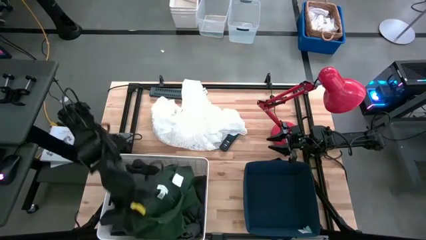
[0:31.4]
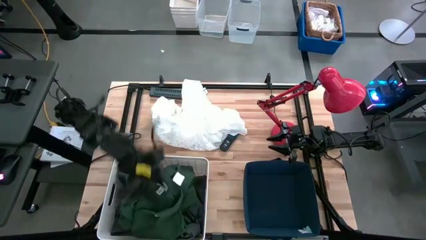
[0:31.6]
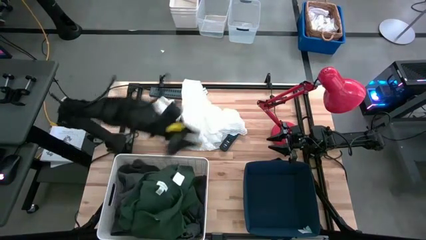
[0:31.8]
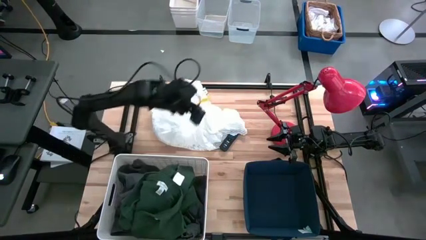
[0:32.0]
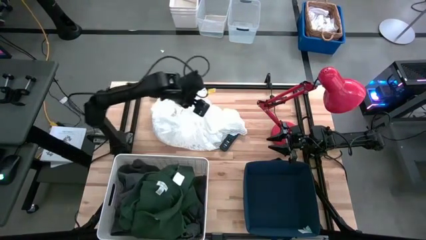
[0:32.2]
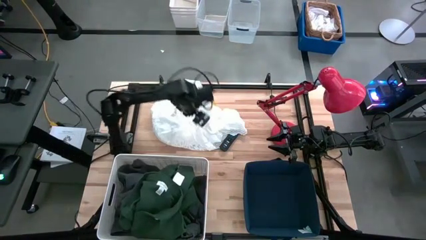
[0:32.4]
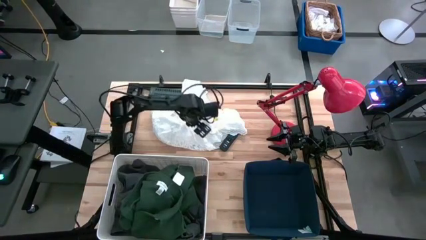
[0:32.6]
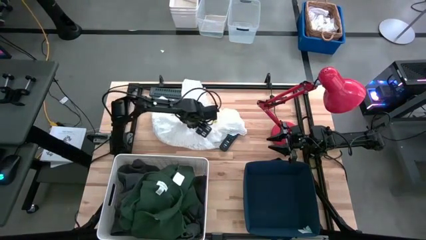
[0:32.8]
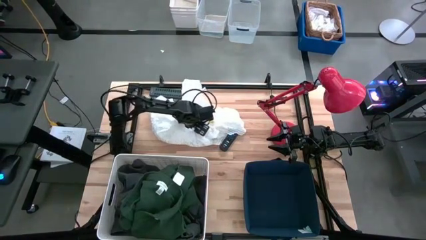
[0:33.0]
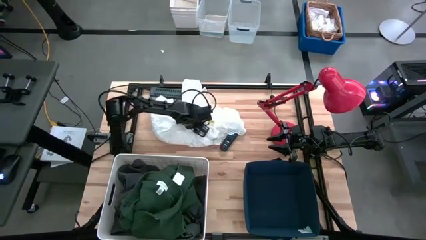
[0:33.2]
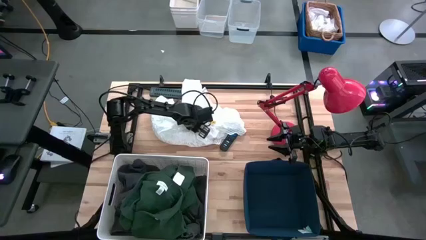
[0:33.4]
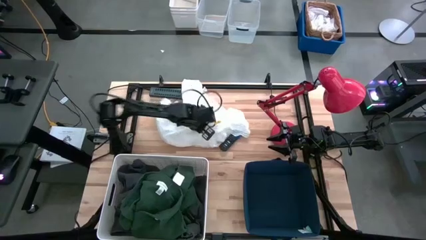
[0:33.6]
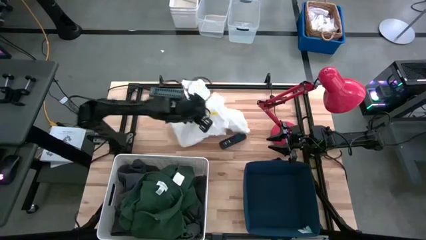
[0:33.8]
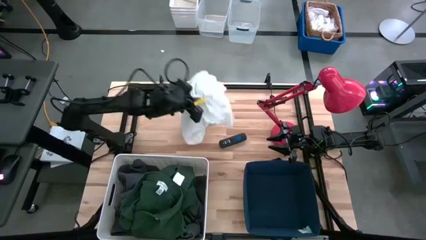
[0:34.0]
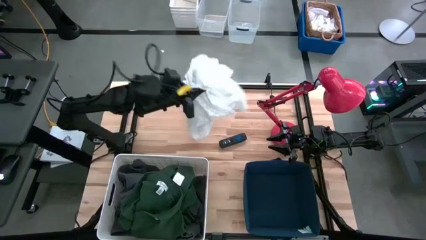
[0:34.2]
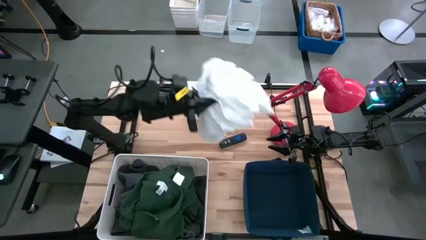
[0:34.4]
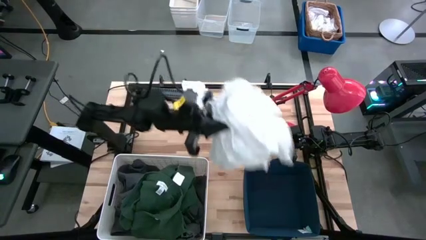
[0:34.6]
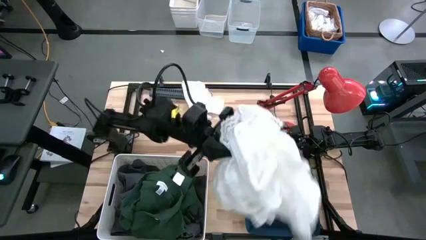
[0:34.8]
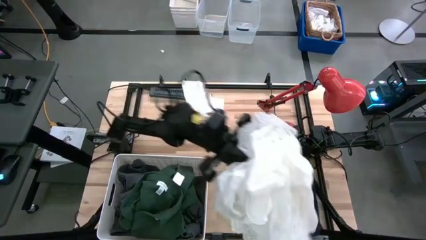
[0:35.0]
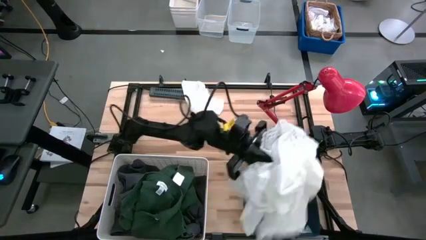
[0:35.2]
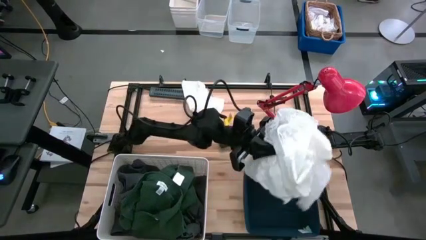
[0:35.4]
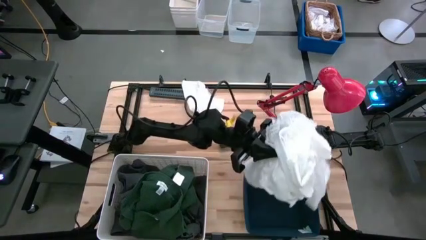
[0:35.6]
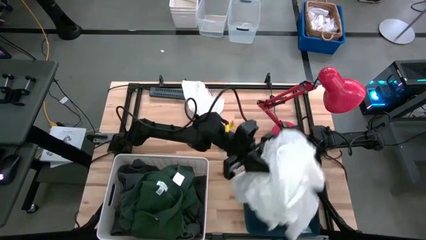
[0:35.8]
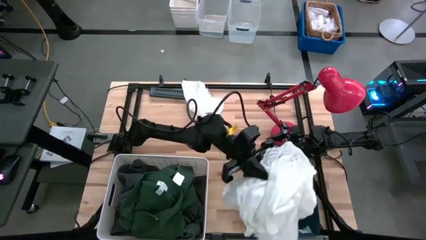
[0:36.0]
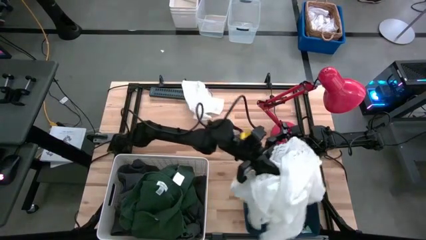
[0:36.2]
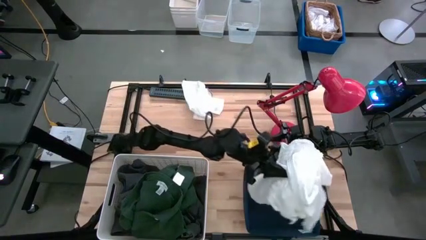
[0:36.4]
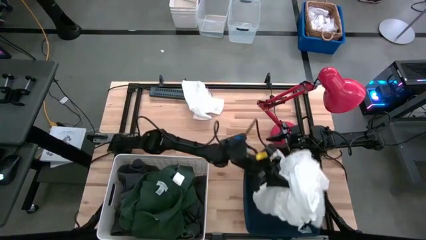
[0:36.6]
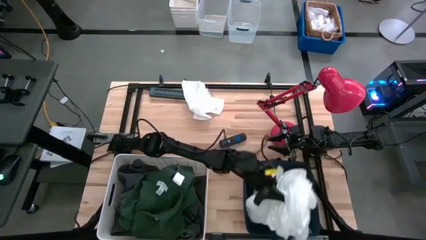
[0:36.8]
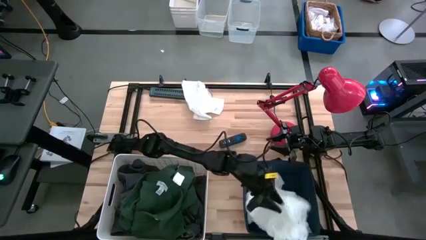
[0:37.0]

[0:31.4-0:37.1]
Task: Sort clothes
Put the white blouse into the blue bin

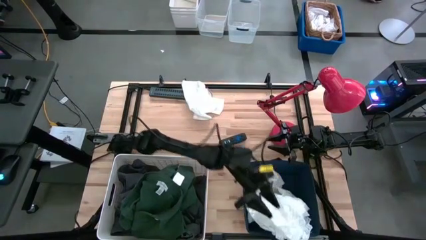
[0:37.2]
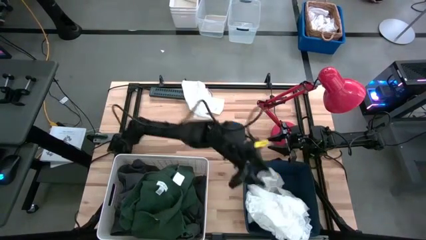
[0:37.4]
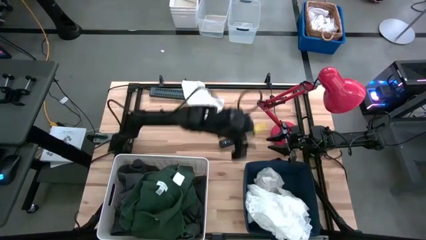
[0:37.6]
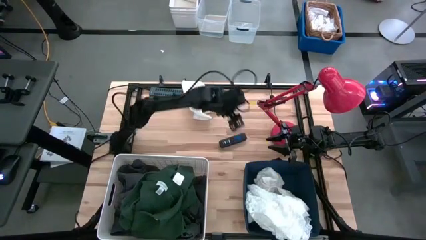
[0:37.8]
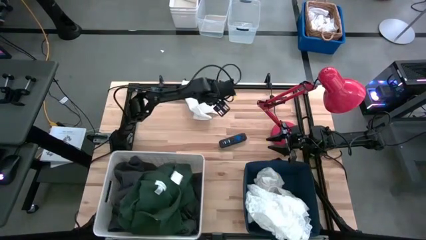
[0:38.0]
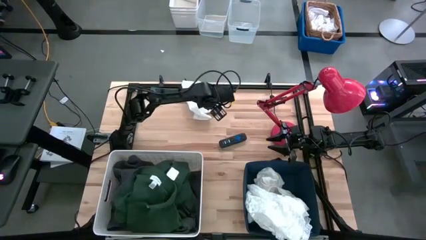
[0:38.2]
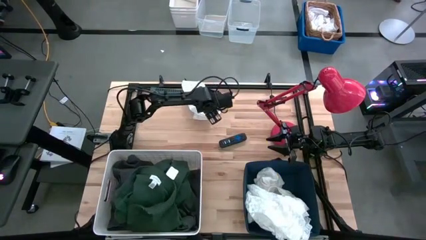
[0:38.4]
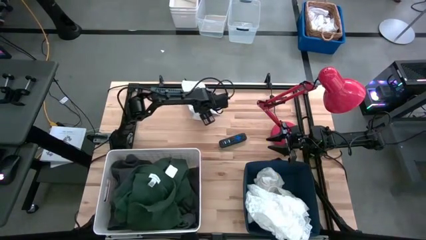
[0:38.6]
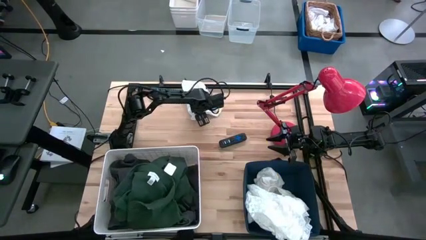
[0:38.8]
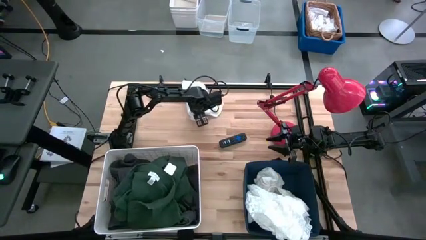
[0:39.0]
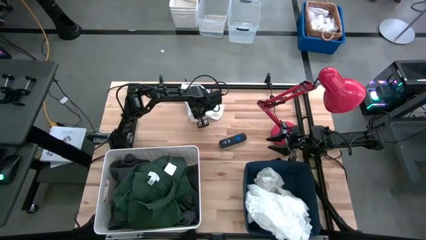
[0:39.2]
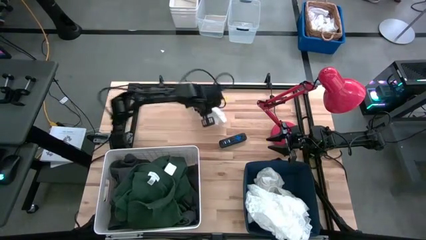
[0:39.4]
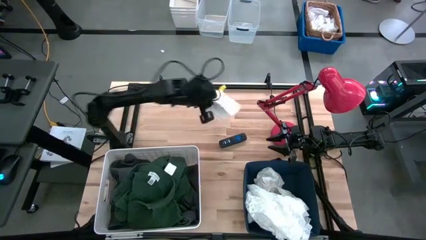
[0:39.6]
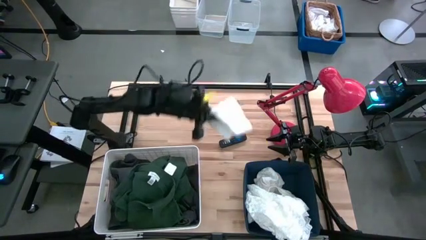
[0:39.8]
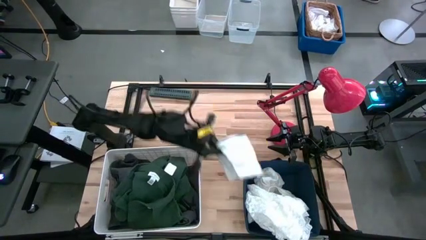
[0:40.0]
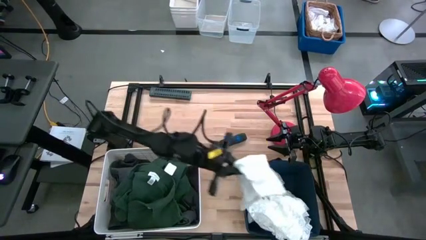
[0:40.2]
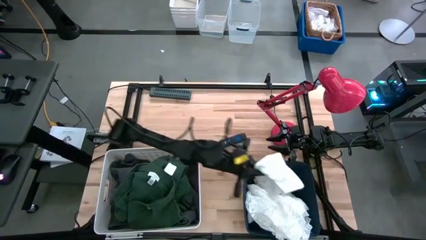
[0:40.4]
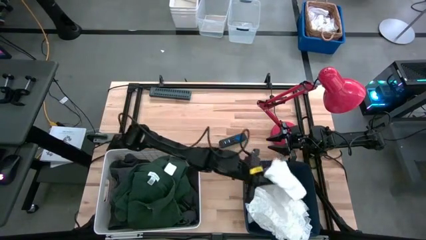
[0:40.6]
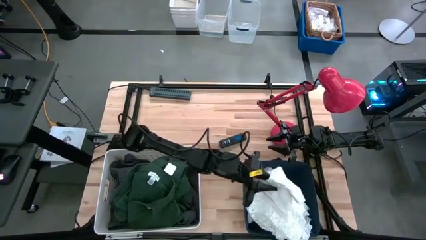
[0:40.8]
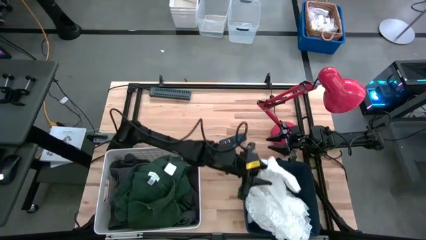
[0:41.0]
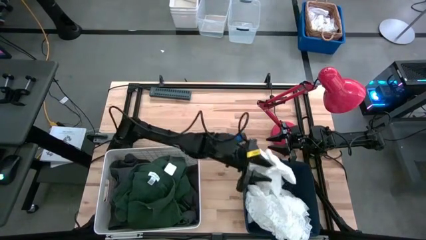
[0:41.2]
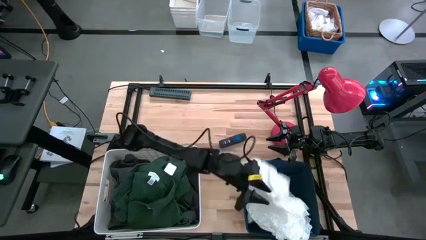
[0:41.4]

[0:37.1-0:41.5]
Put the white pants into the blue bin

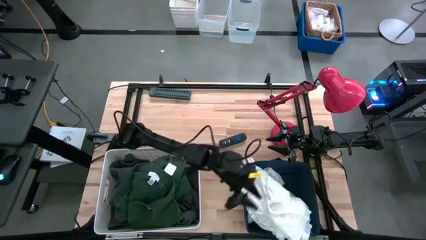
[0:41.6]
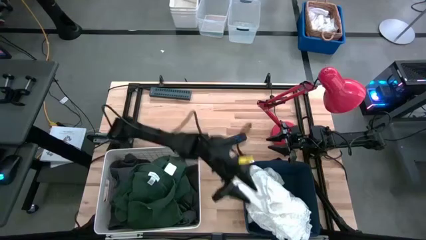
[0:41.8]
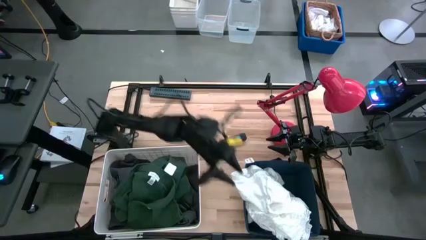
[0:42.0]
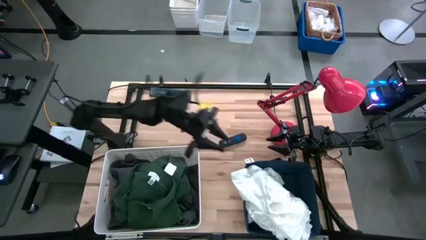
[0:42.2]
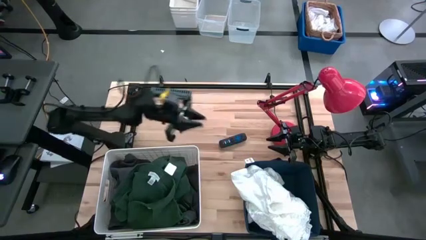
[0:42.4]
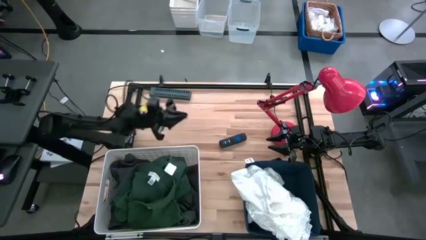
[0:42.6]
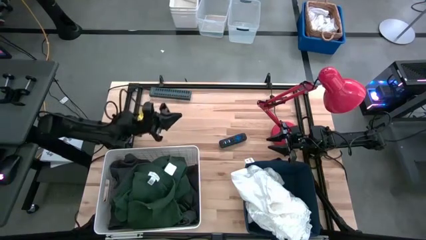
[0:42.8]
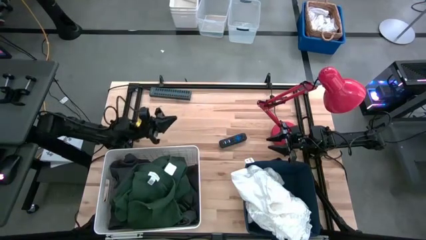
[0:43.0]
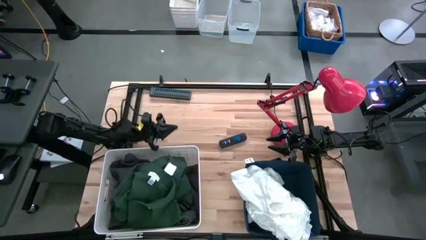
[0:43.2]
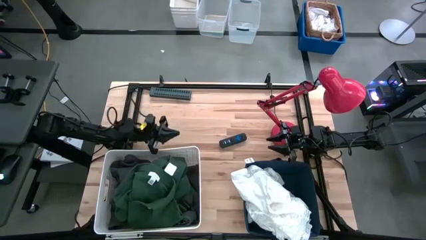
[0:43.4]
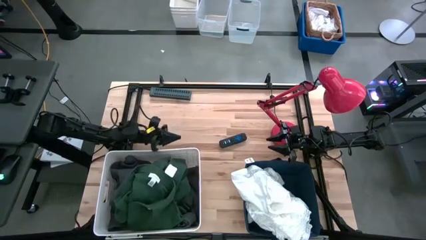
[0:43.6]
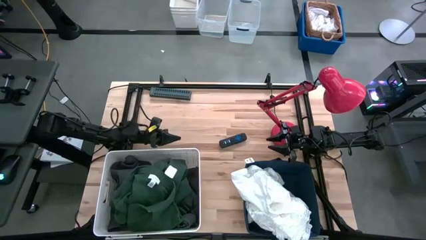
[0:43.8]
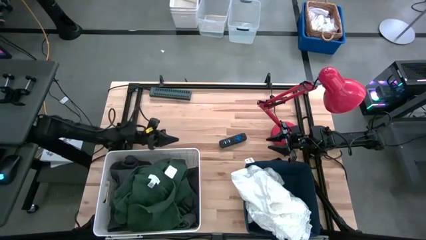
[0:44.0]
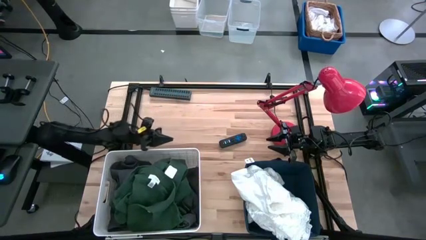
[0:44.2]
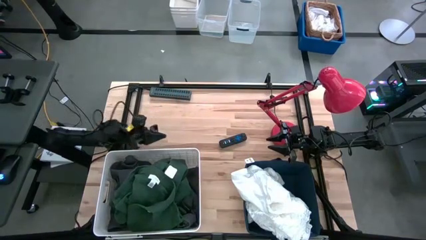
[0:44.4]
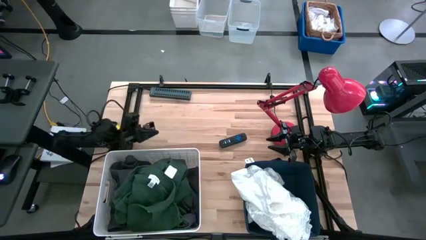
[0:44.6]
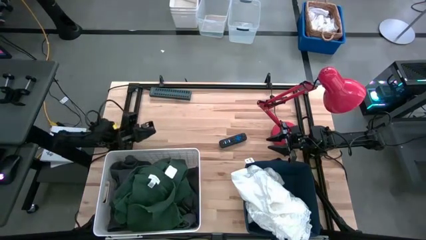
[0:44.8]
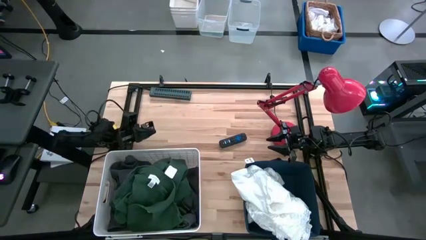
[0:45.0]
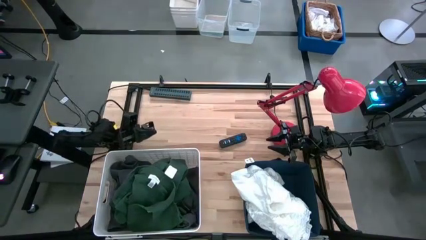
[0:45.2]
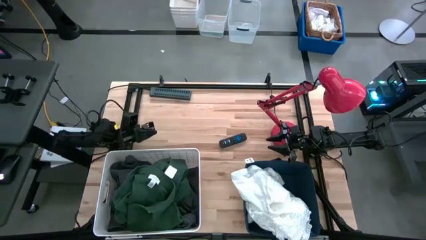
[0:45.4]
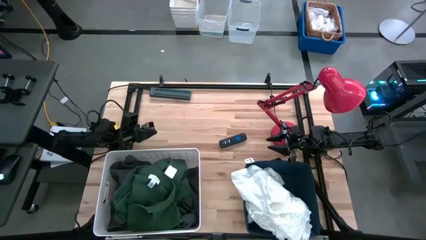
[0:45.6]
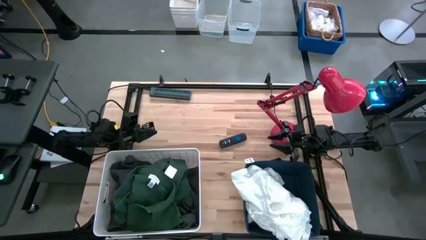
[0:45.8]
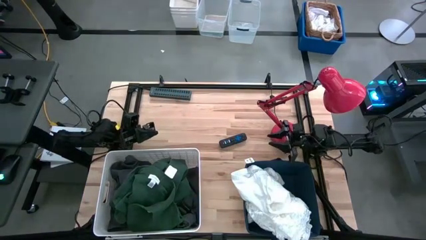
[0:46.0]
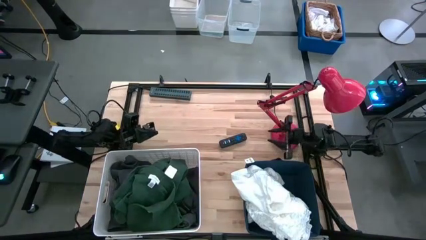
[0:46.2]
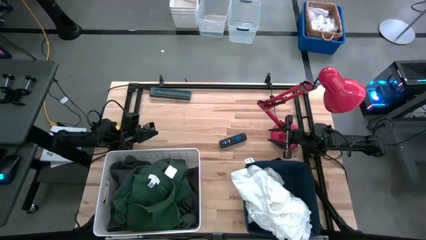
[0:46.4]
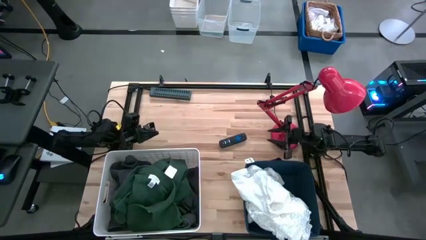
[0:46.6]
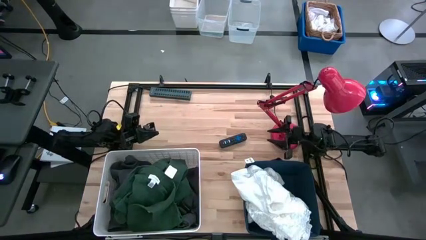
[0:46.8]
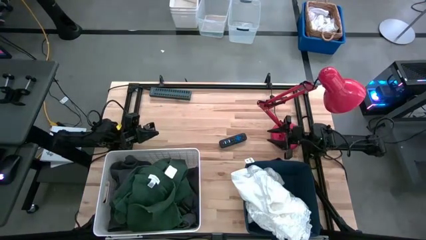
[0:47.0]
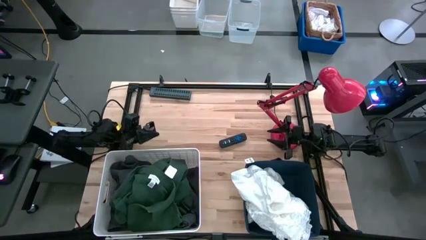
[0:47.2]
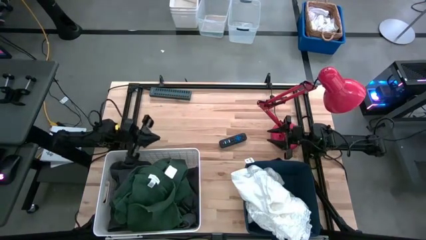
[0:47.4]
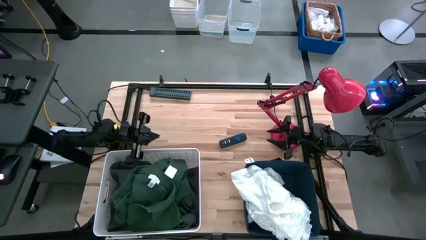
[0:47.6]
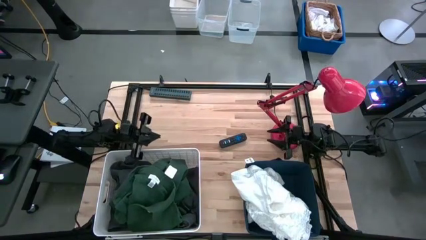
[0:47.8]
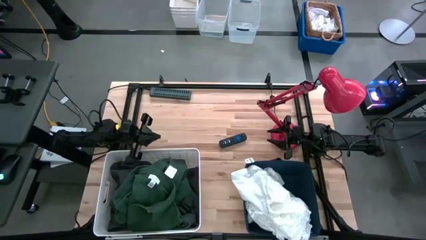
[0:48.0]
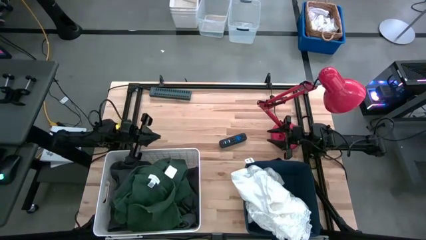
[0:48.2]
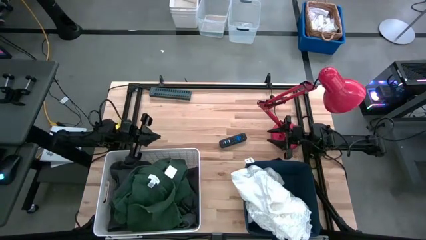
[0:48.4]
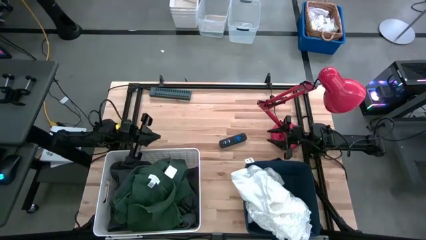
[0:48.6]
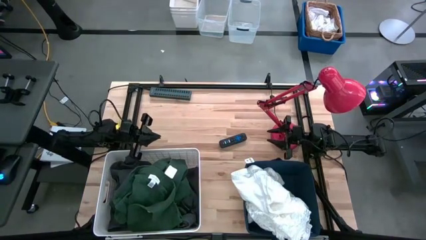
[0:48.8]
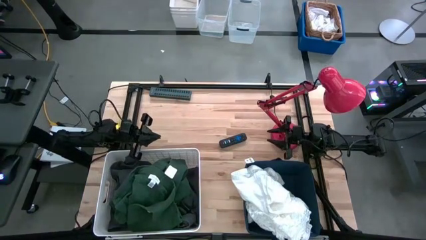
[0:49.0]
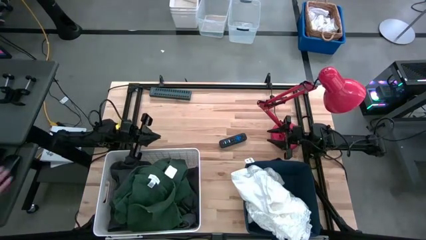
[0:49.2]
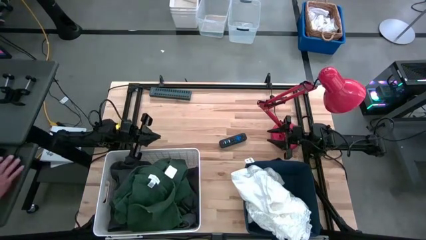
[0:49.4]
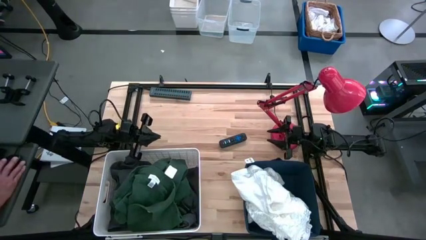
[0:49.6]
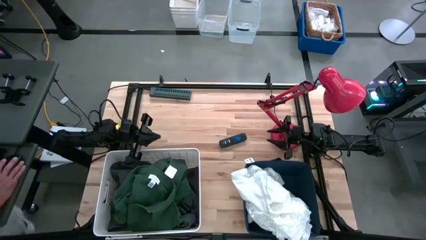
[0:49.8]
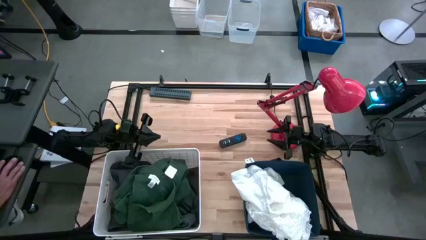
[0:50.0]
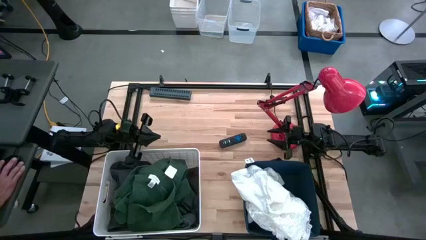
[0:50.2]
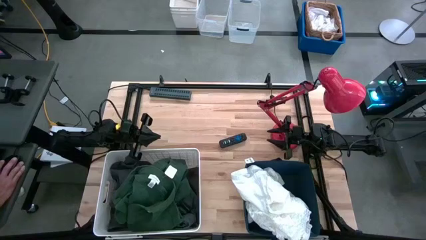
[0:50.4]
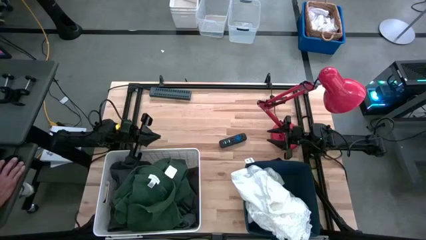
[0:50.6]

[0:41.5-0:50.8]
Return to Home Position
